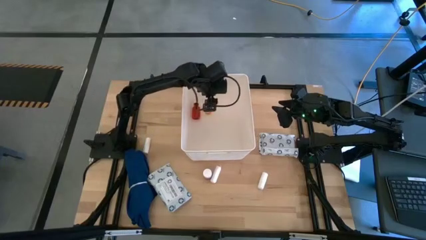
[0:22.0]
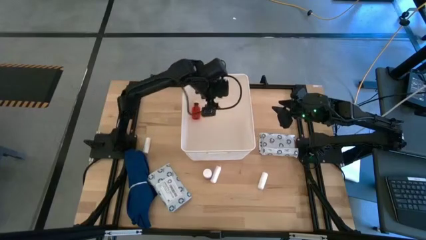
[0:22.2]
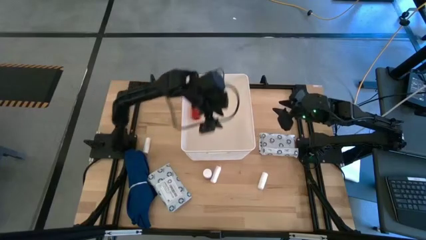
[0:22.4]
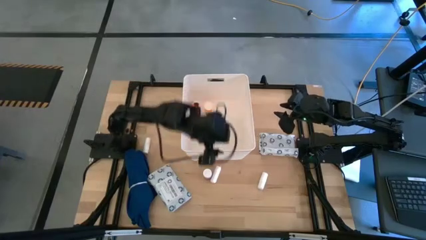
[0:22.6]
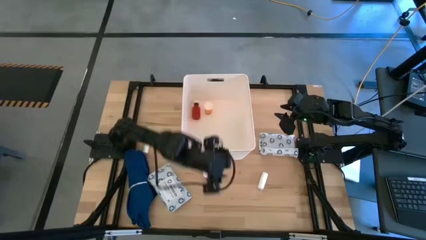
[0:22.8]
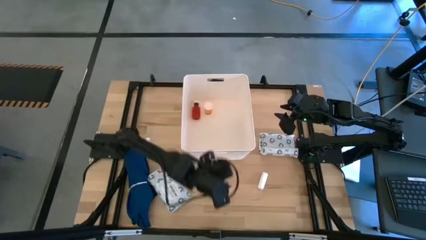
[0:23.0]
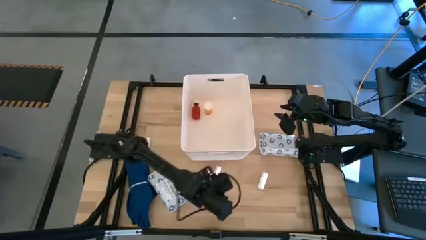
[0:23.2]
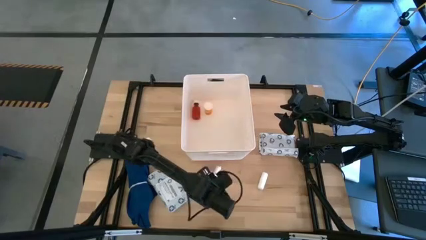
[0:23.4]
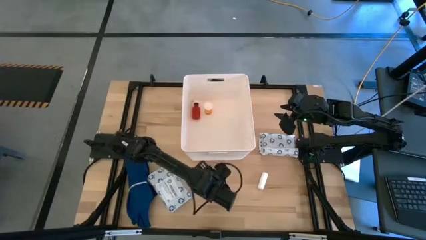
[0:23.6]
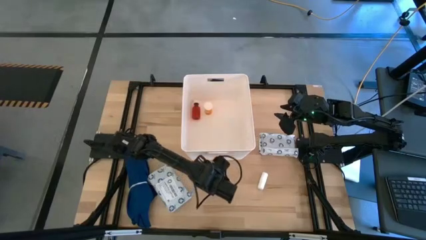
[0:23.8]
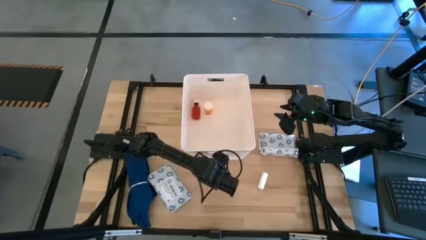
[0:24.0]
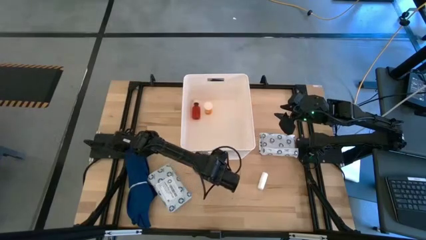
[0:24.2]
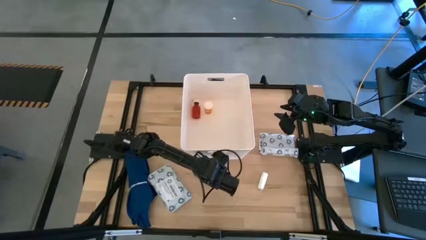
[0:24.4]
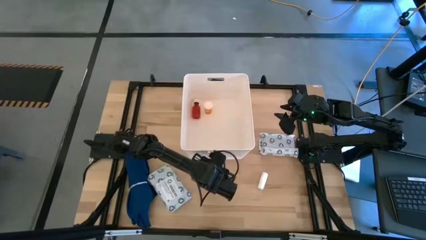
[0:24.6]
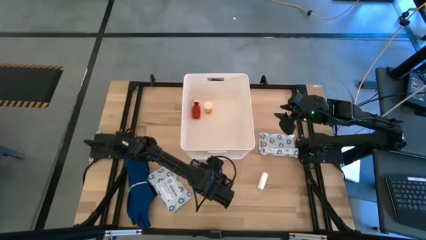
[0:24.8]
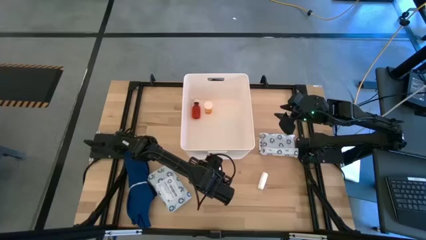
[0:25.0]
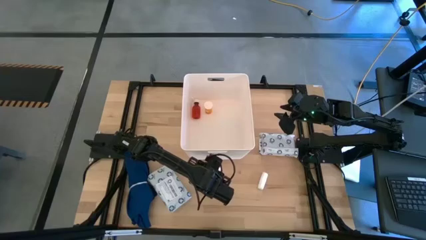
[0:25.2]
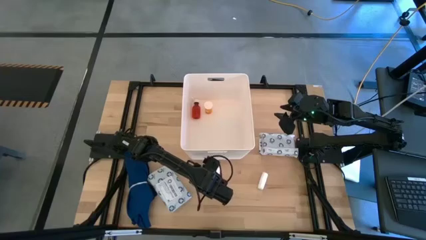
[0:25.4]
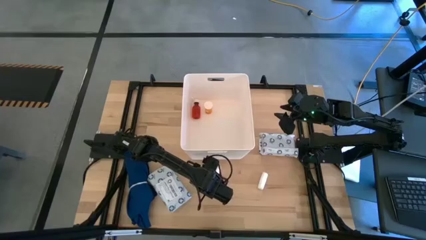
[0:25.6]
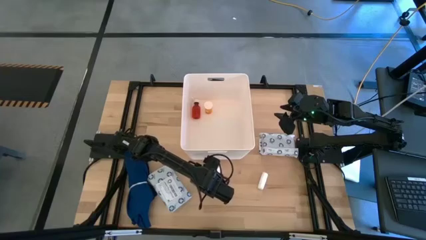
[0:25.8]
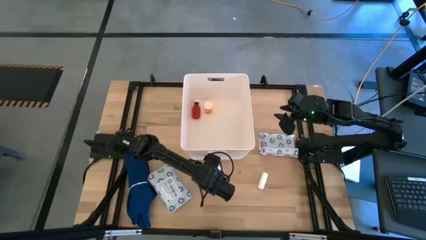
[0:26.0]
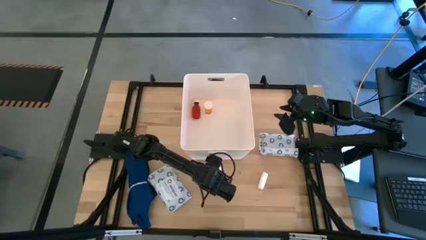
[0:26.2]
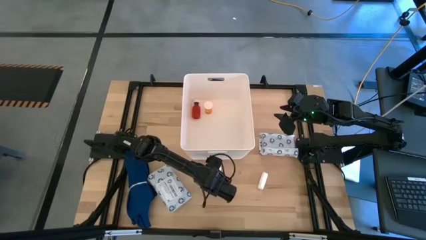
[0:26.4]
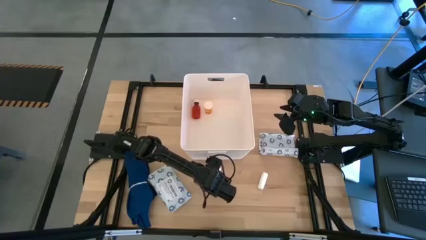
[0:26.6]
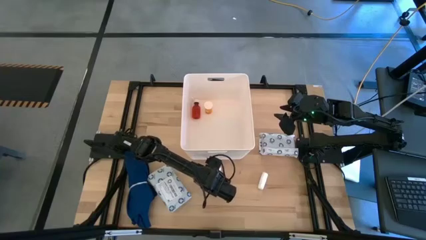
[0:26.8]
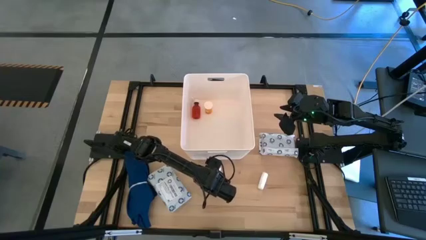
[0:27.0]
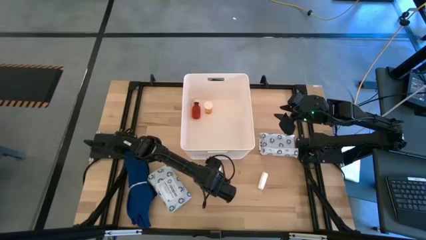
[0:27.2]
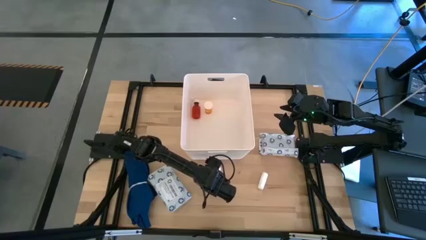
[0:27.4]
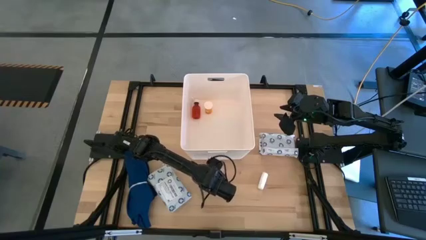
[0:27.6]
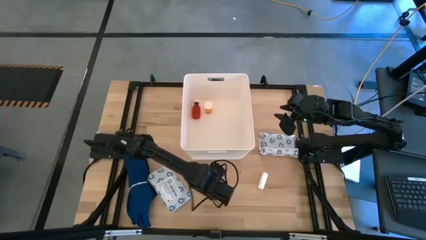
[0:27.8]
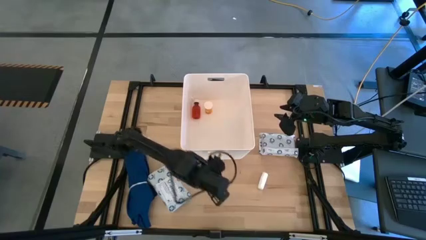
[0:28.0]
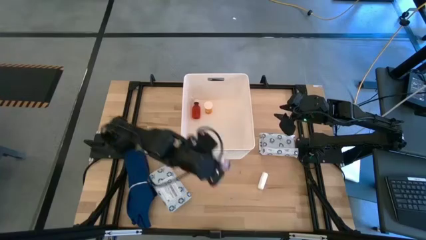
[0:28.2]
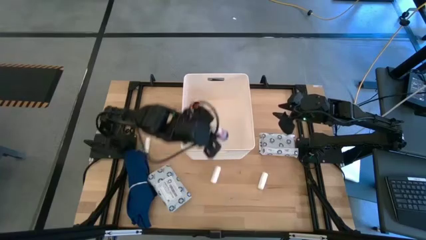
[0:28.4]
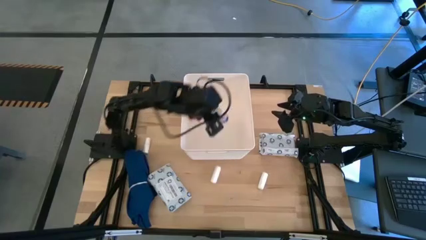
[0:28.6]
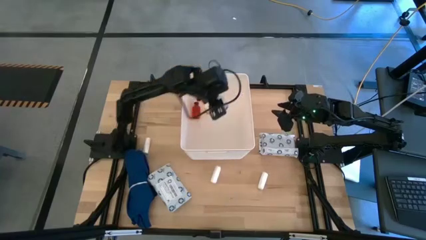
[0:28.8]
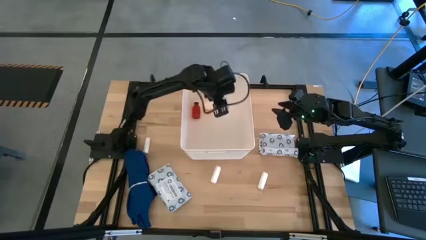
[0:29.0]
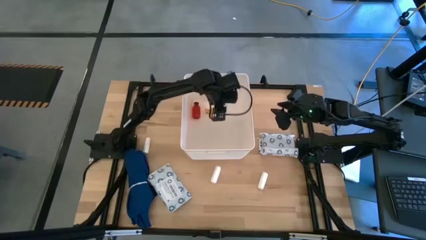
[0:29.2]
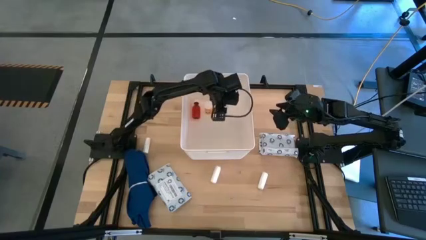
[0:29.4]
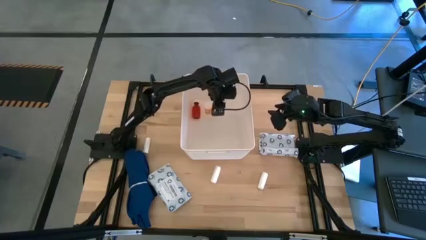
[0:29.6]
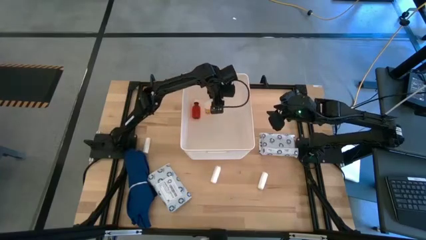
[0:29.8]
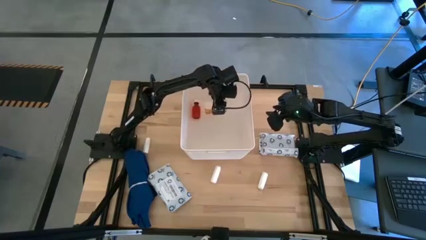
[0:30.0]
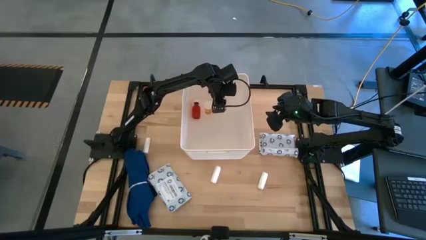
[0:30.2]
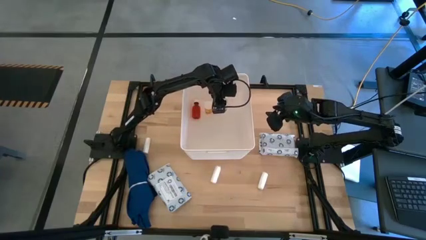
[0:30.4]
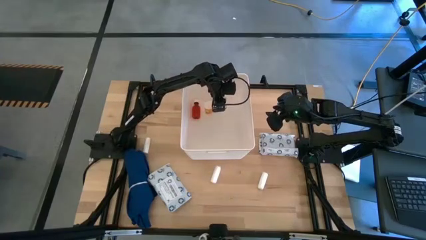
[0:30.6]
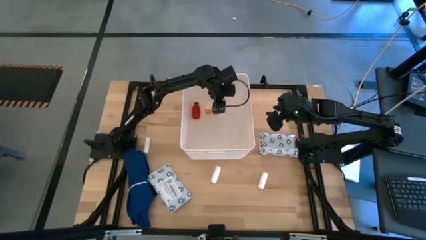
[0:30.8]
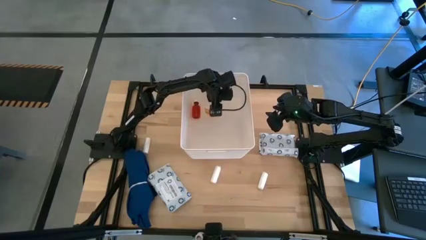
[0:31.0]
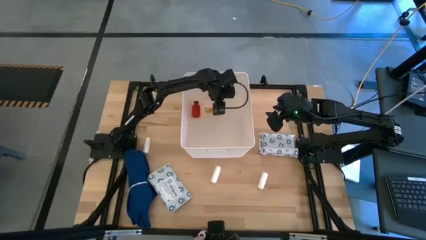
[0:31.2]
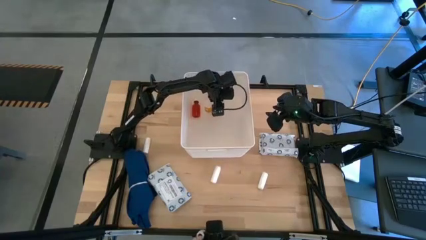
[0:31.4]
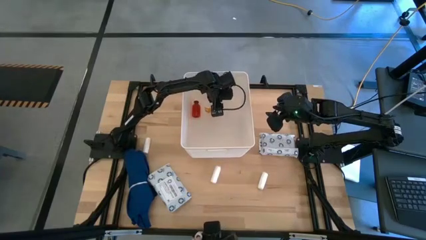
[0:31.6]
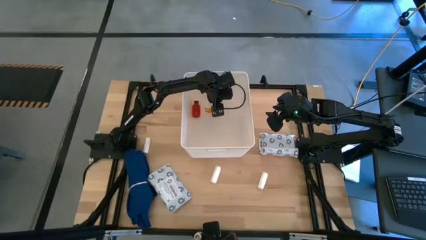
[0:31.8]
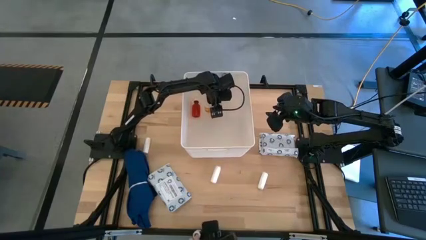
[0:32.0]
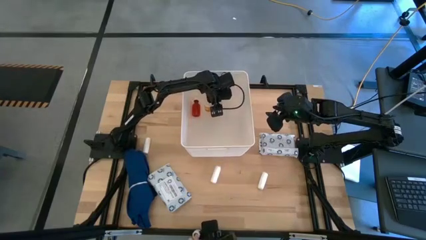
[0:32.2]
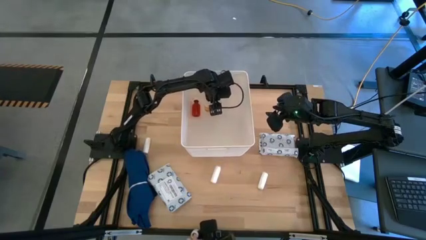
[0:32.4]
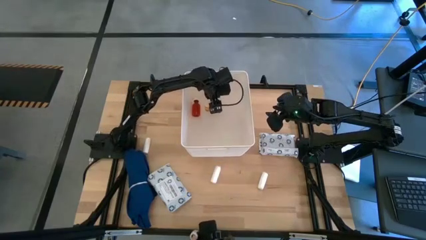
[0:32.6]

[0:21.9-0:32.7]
Task: Pick & place medical supplies in basket/bin
Put the pink pill bottle into the white bin

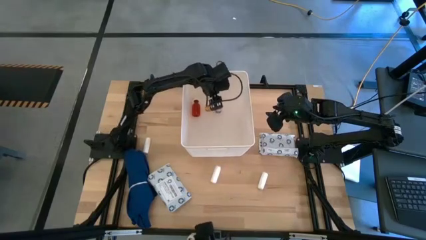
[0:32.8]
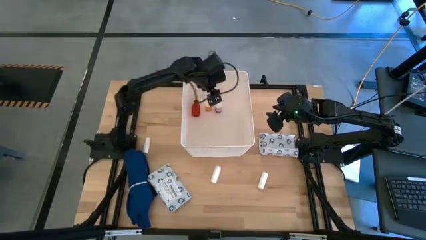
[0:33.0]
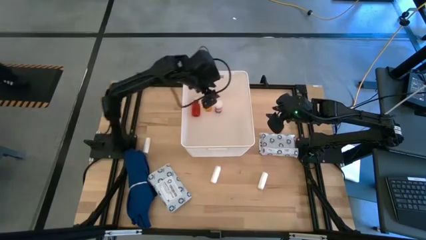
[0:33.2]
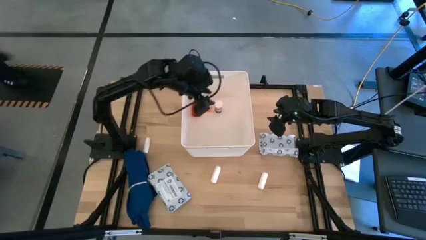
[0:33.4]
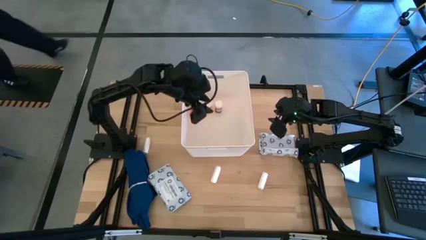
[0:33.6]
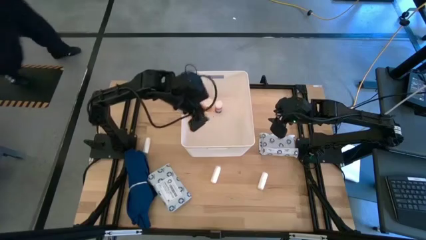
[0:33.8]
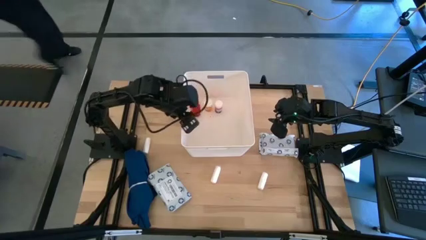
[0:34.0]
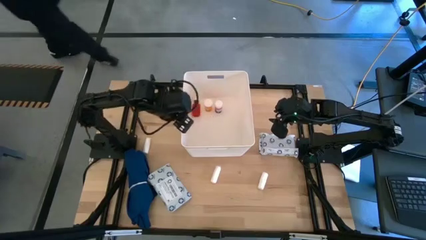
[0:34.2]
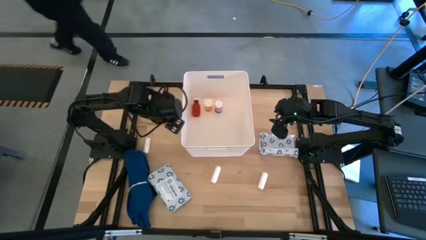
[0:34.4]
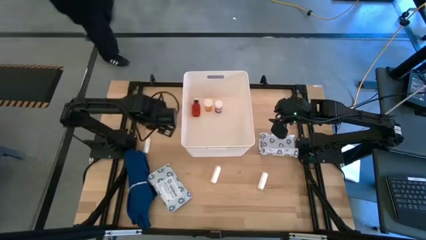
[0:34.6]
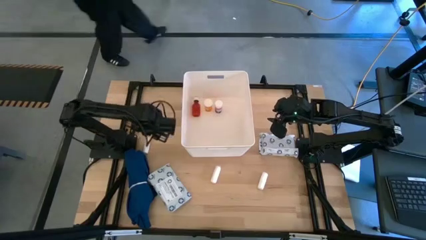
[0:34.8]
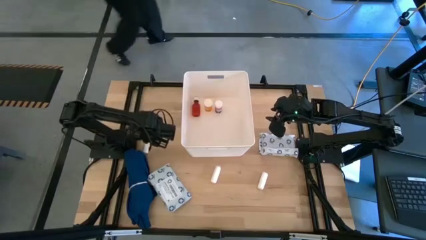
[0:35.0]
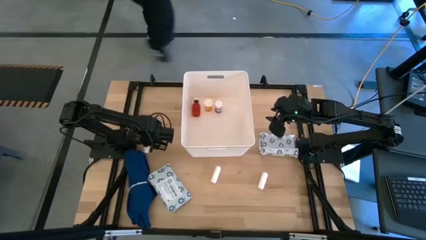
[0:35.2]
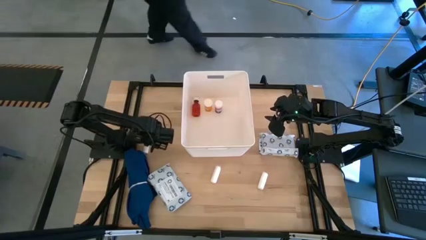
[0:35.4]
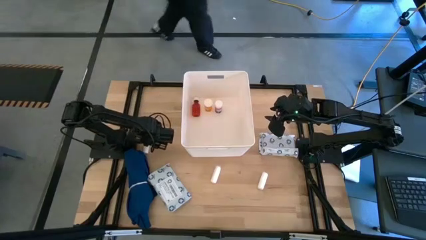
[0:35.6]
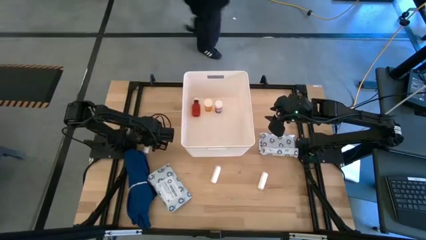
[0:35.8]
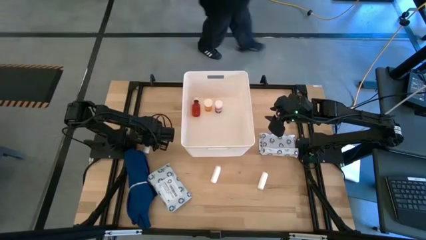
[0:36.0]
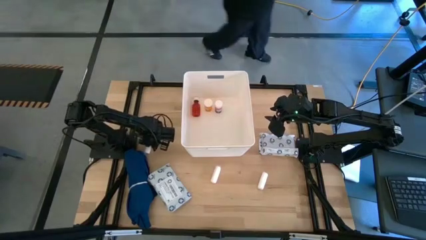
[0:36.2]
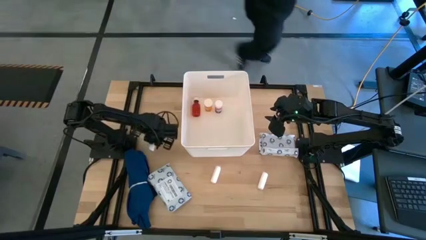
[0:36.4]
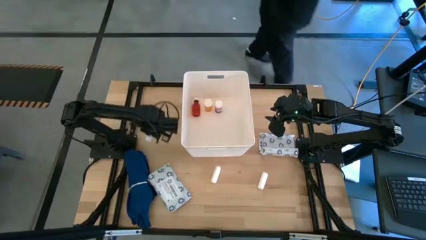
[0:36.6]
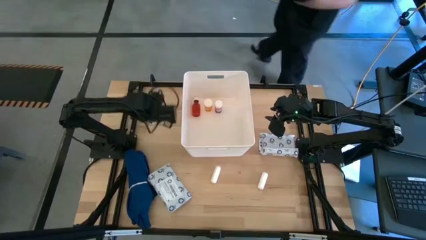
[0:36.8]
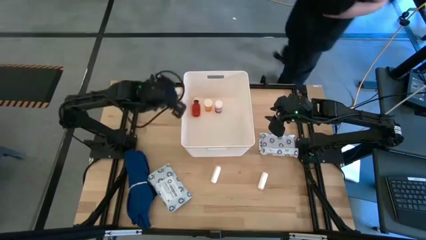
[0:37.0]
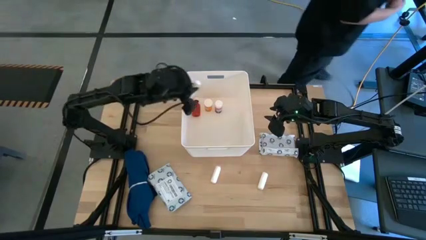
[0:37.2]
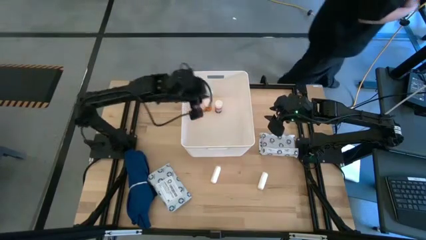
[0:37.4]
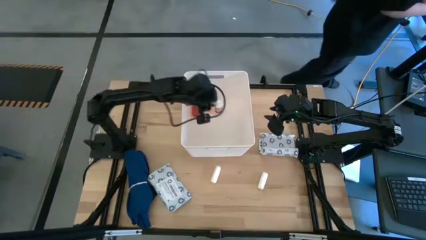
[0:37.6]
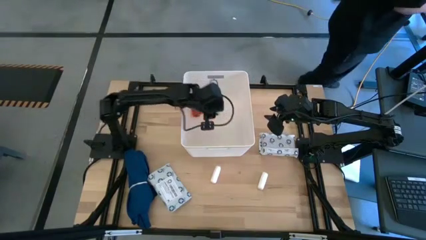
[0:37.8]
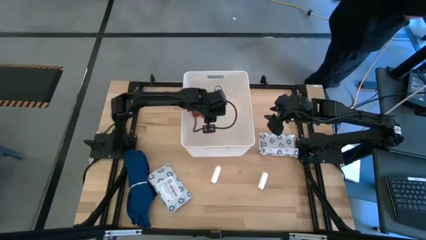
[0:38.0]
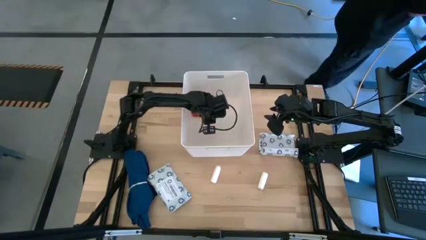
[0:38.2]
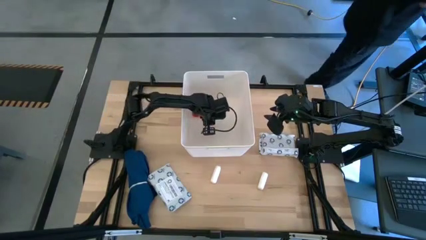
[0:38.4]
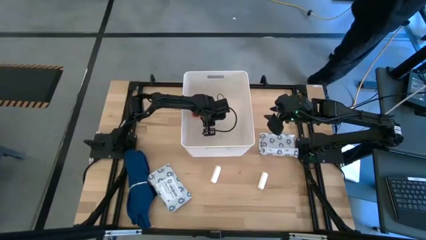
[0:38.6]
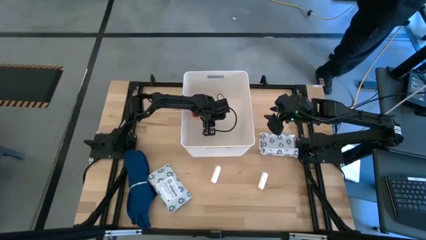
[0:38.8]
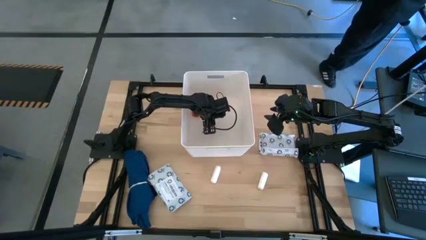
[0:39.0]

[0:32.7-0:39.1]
Put the left rolled gauze into the white bin
